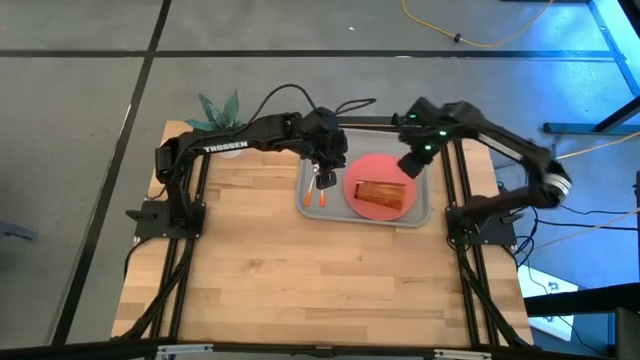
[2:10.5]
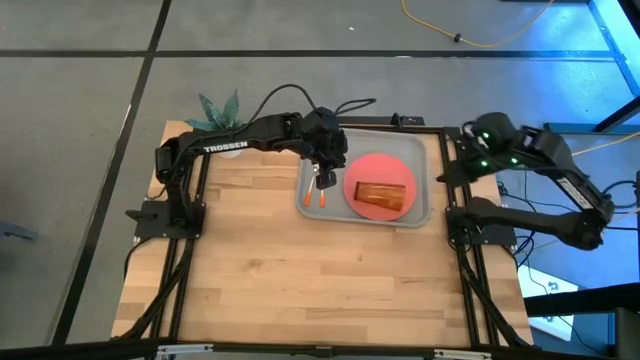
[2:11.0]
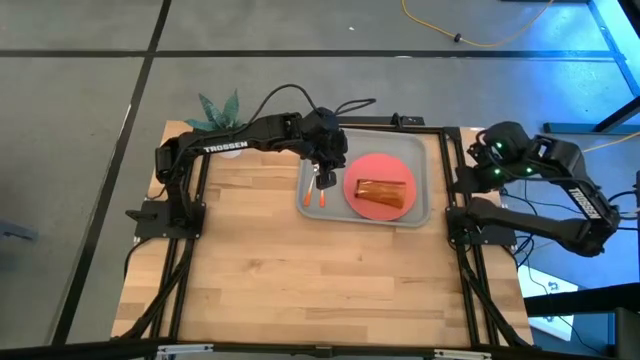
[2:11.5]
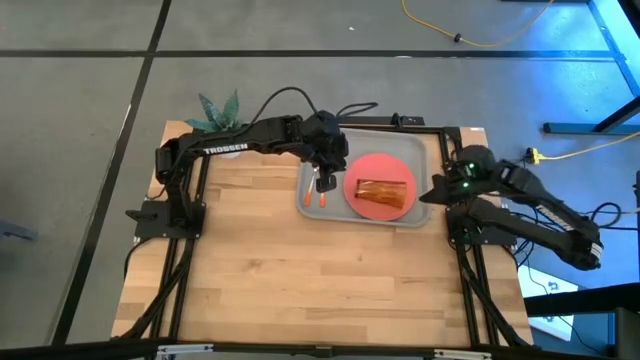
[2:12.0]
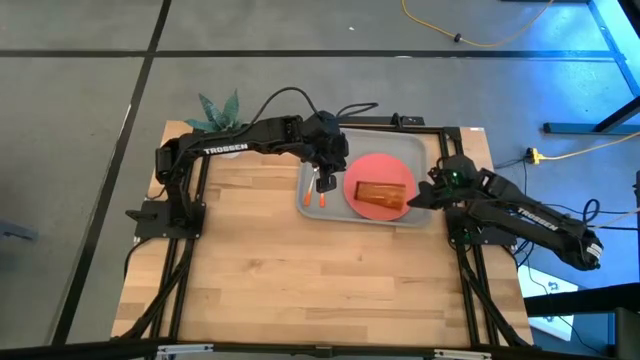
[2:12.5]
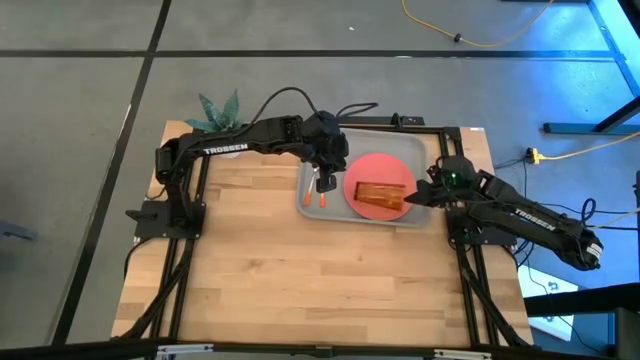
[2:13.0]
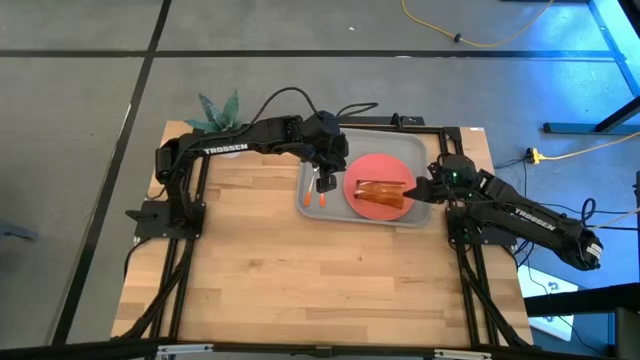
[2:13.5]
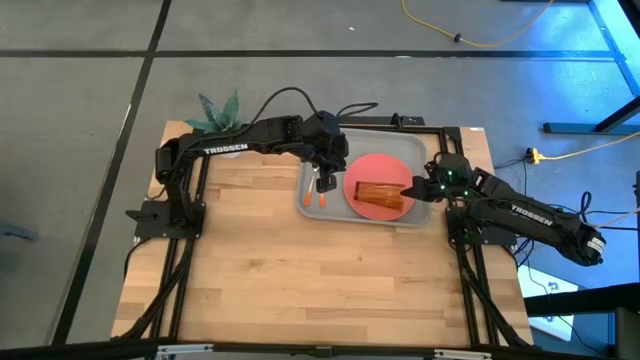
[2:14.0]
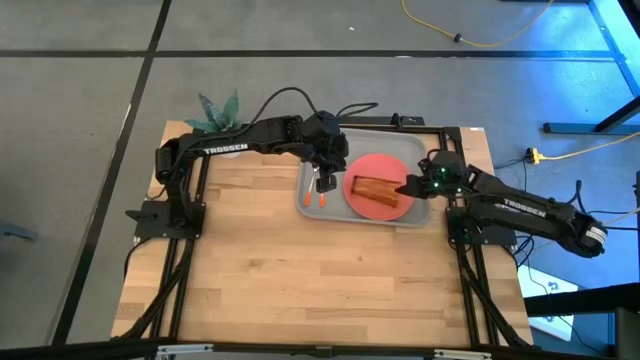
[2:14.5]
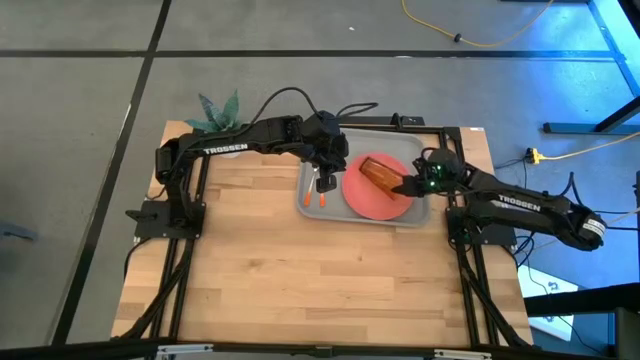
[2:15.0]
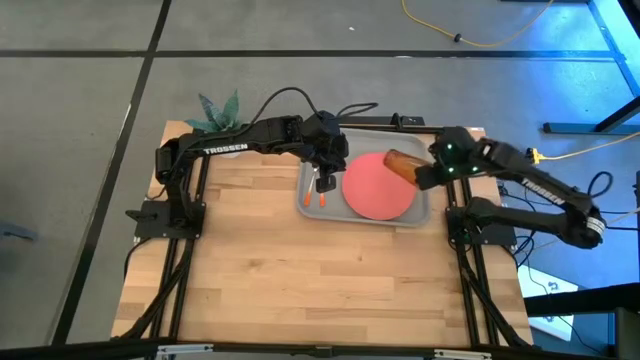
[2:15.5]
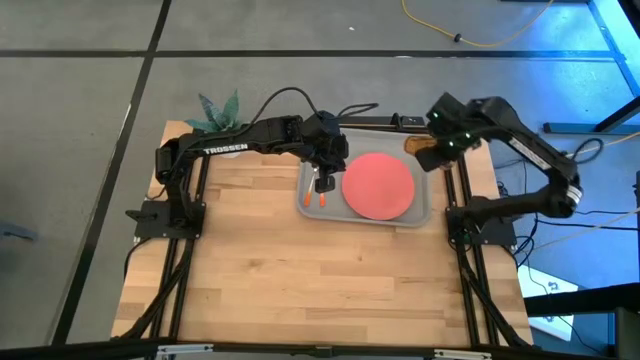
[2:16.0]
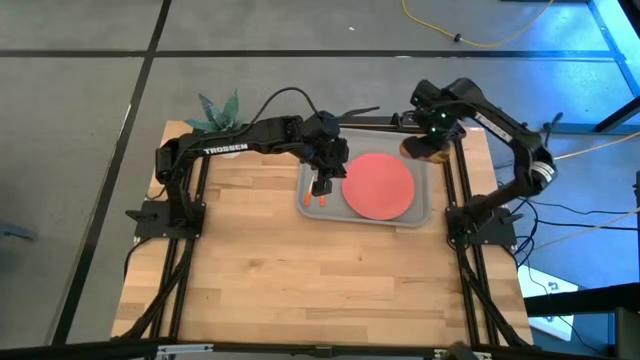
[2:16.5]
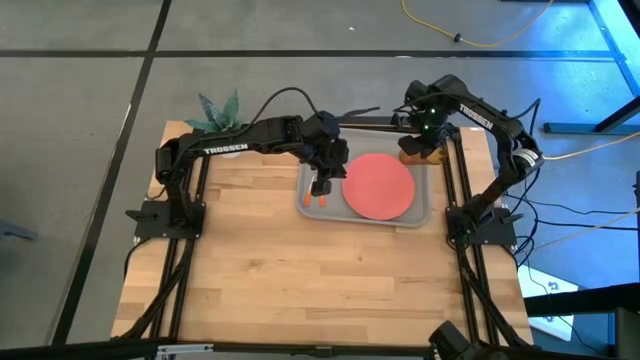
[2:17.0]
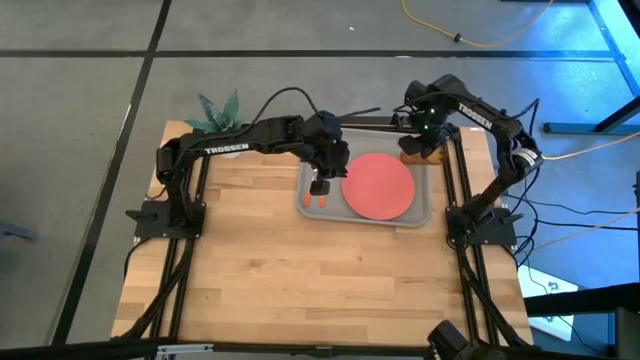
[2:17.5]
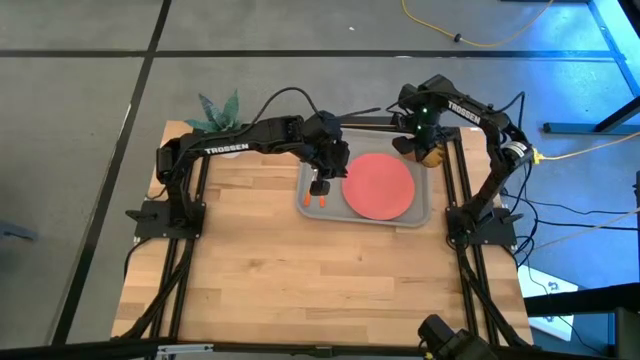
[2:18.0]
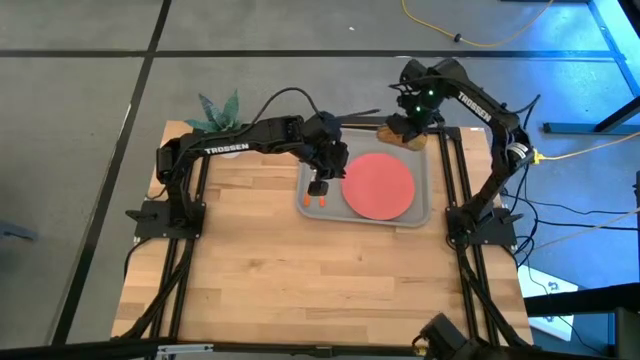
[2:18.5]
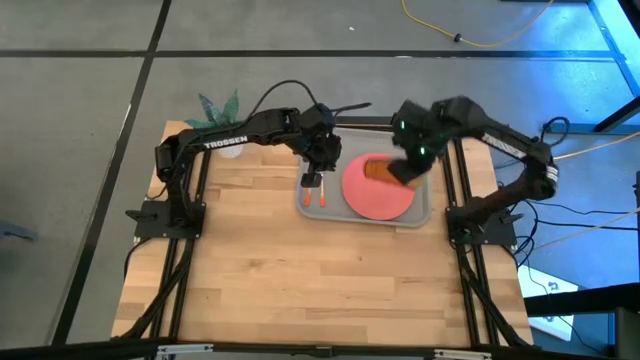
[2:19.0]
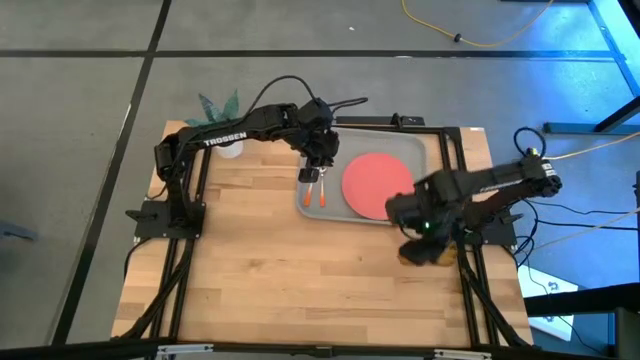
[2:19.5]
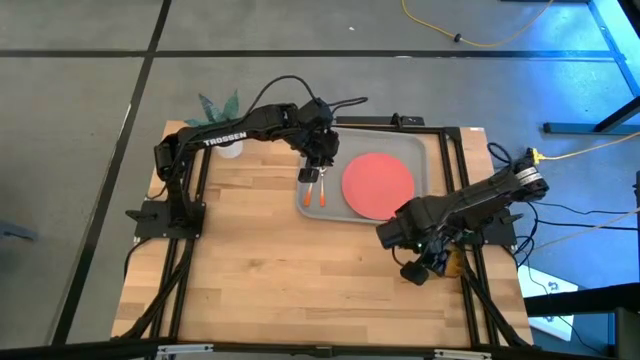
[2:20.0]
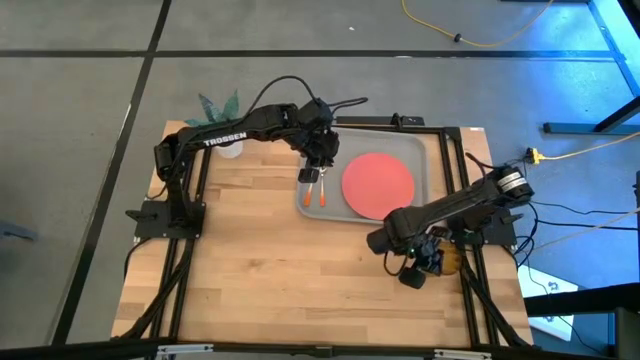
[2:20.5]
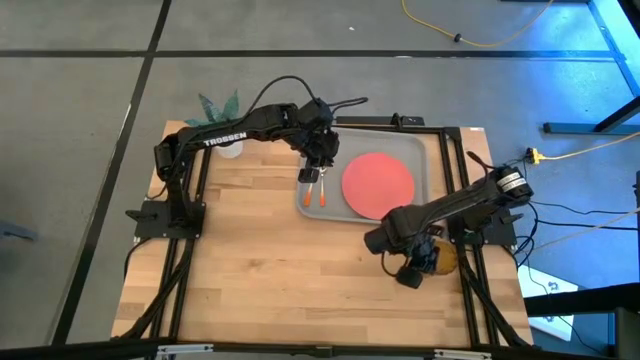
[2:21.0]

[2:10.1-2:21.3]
Task: Pick and place plate/cup/fork/spoon on tray
Remove the orange glass from the gray serving tray

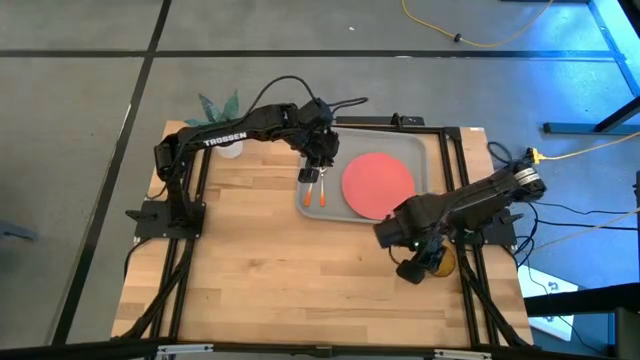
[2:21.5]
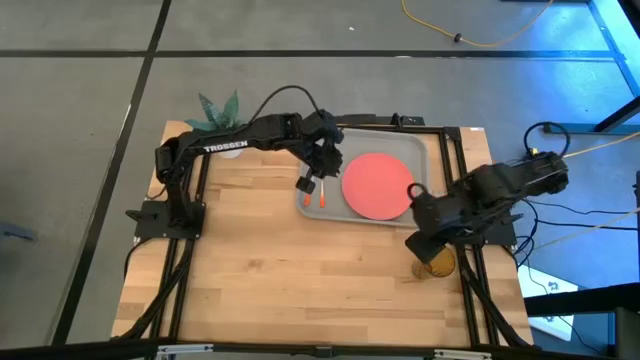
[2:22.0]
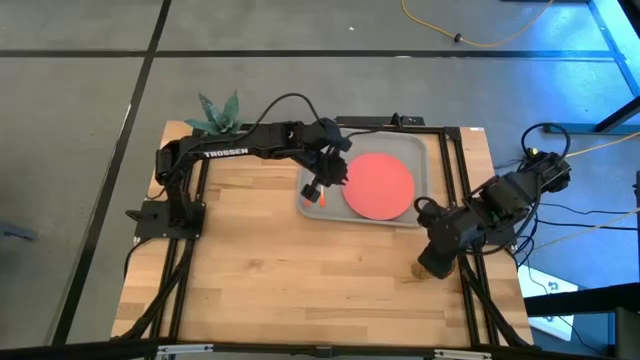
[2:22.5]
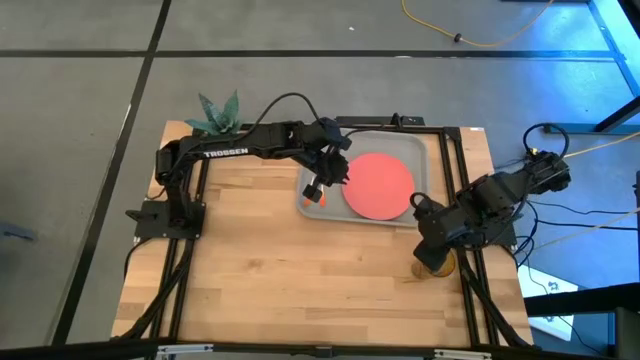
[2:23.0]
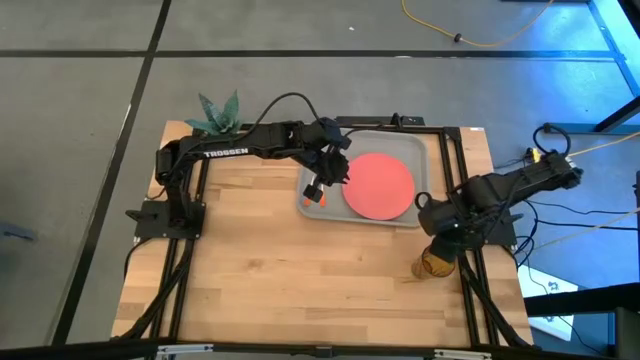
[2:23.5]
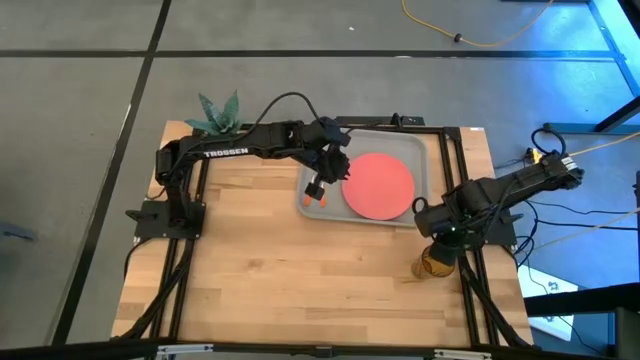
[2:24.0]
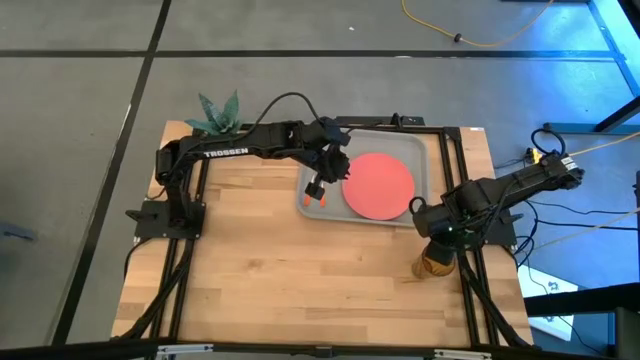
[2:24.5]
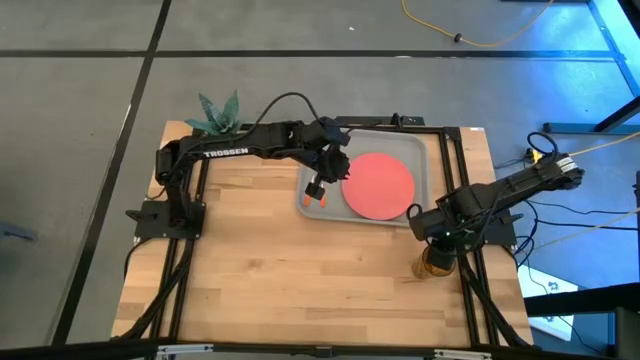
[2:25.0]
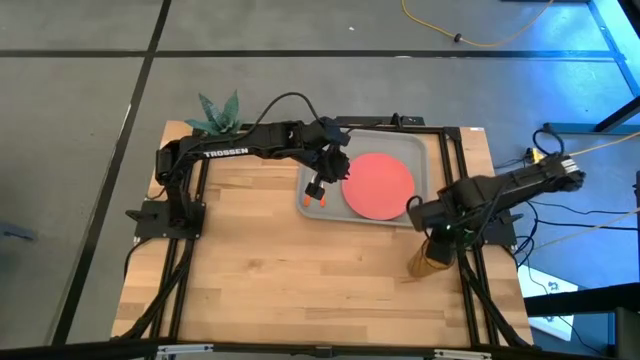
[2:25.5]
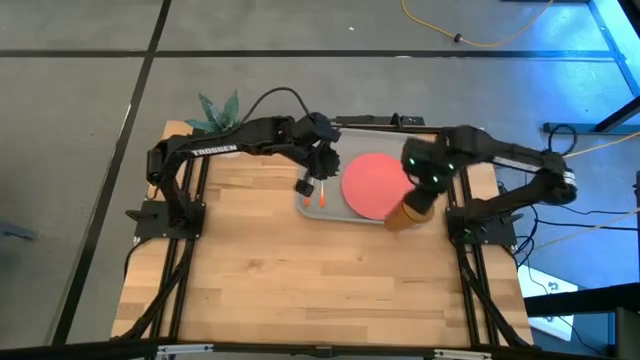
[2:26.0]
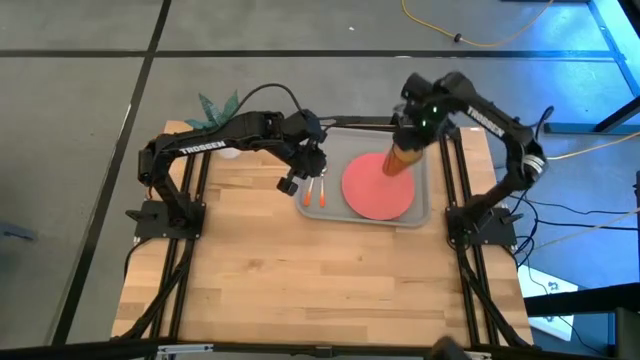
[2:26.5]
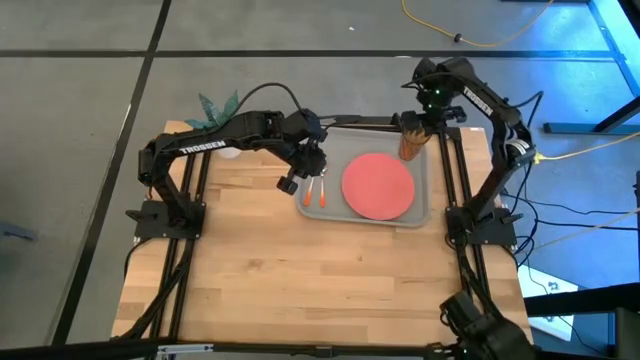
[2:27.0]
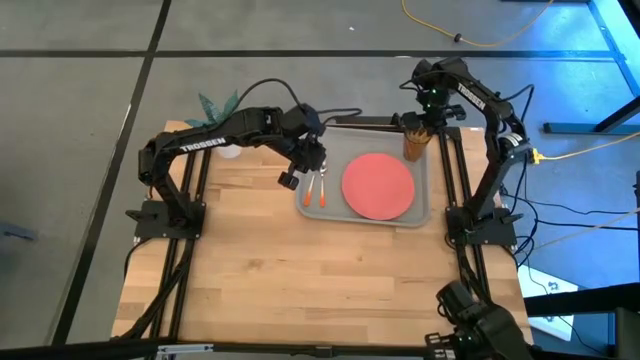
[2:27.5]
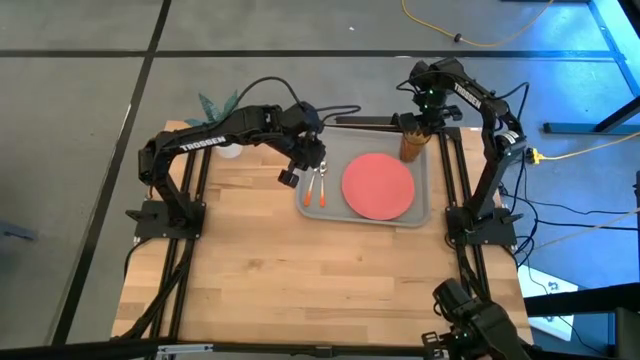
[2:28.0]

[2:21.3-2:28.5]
Put the orange glass on the top right of the pink plate

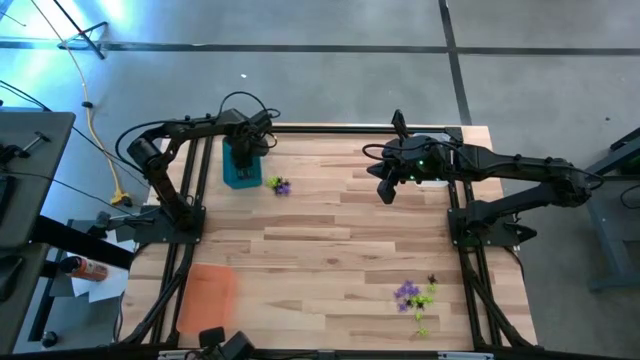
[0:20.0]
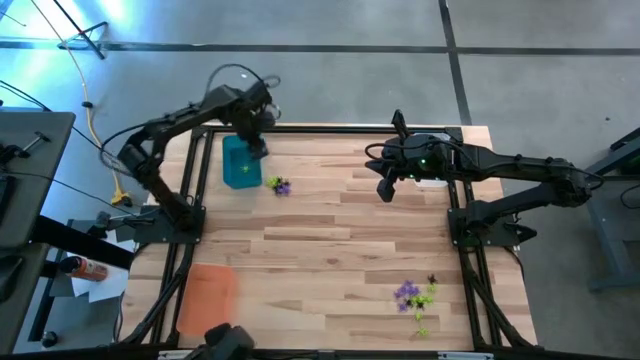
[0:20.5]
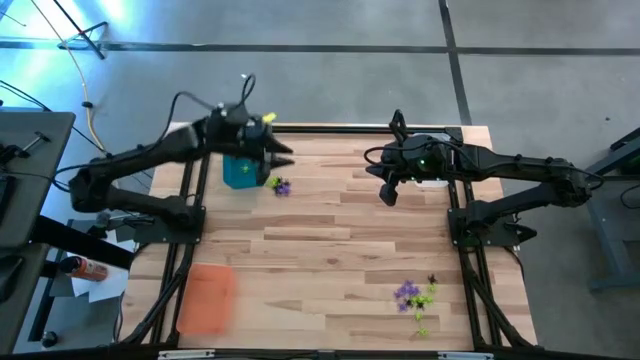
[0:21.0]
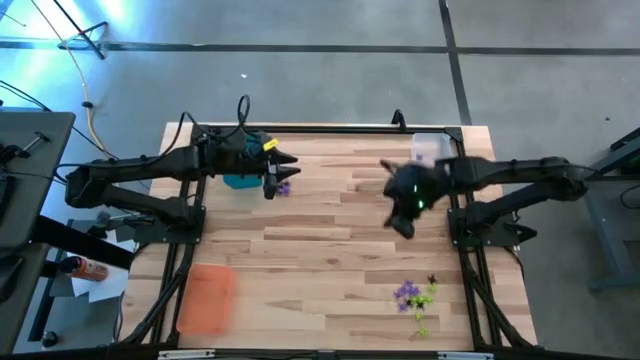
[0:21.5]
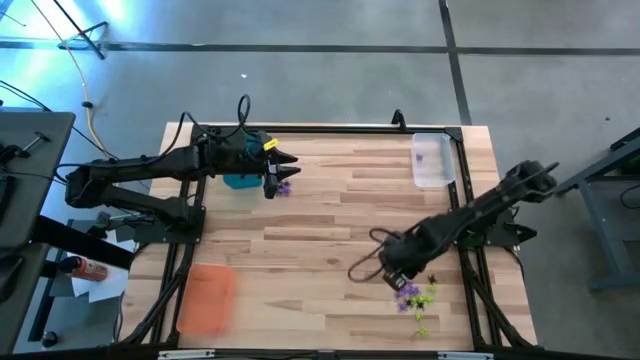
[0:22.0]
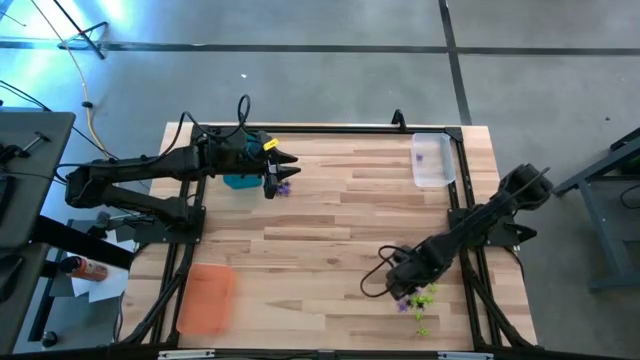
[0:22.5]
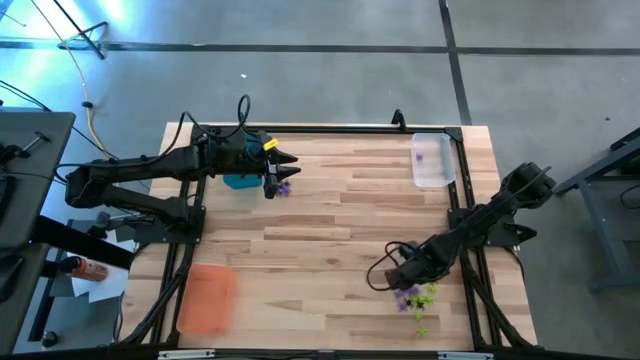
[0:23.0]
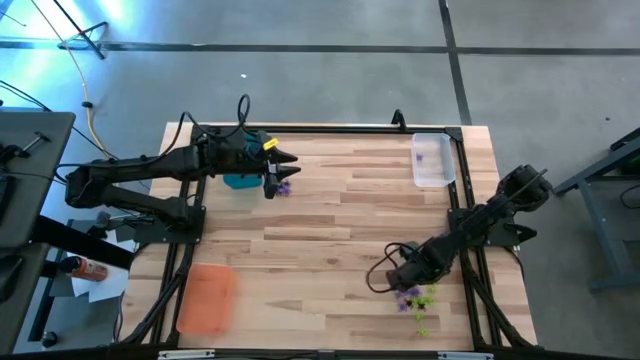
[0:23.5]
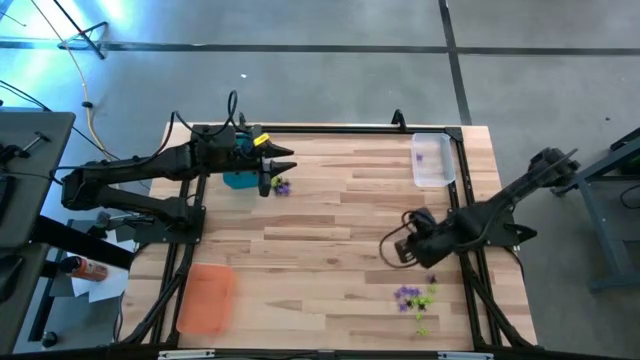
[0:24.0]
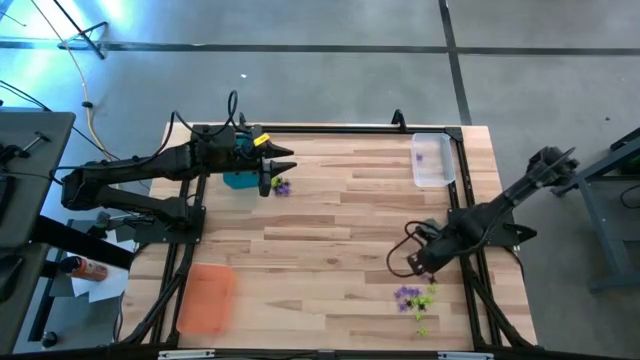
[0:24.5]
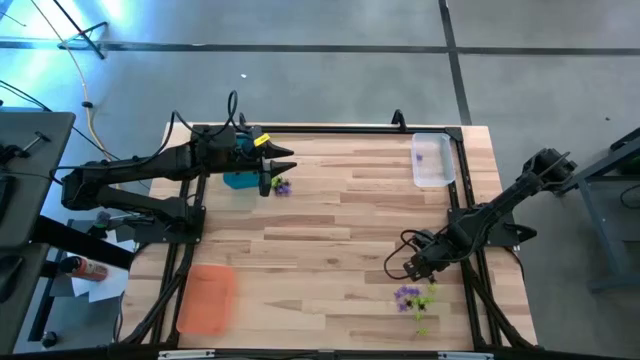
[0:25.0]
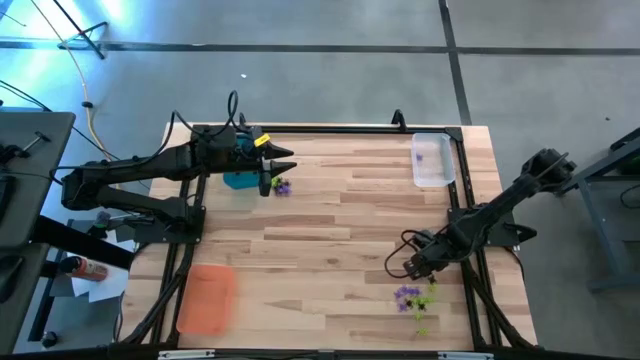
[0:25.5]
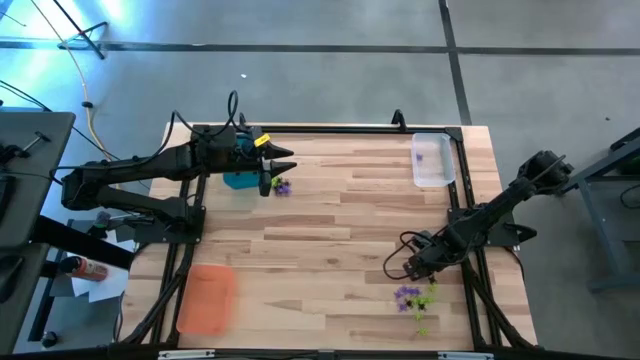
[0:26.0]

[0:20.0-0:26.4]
Task: Sort Halloween decoration
Put the purple spider toy into the transparent bin
